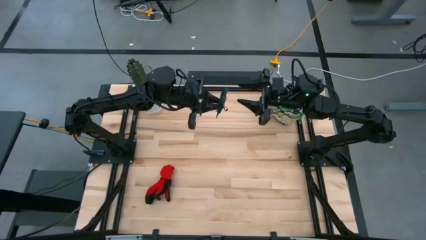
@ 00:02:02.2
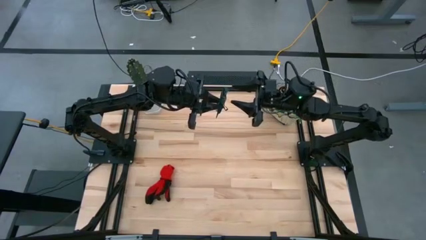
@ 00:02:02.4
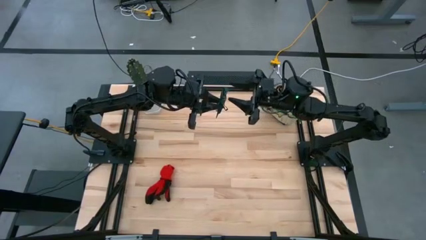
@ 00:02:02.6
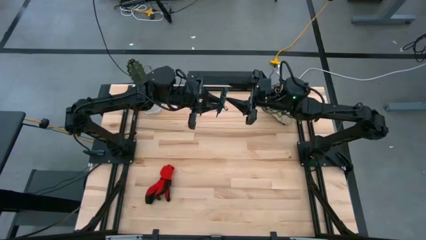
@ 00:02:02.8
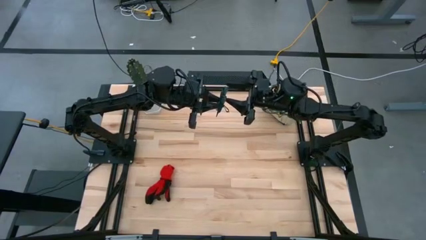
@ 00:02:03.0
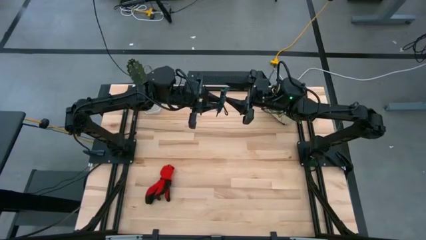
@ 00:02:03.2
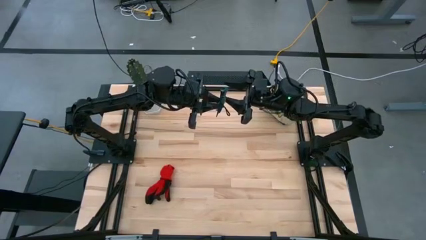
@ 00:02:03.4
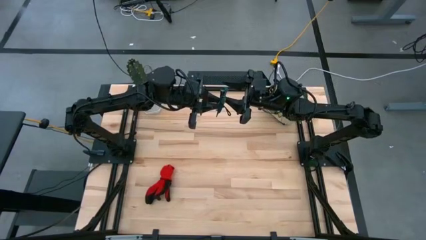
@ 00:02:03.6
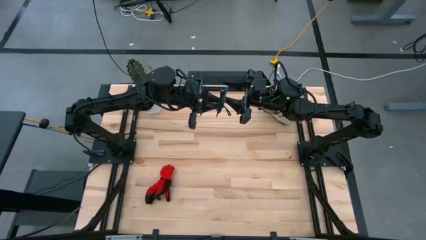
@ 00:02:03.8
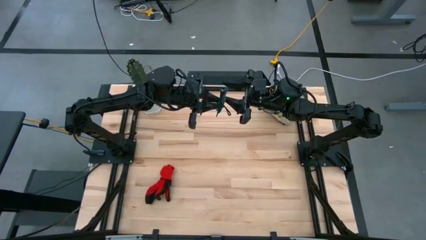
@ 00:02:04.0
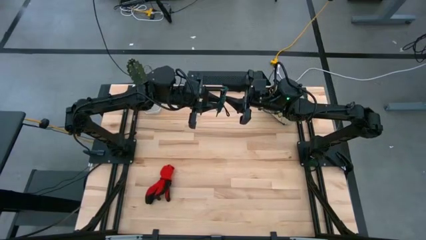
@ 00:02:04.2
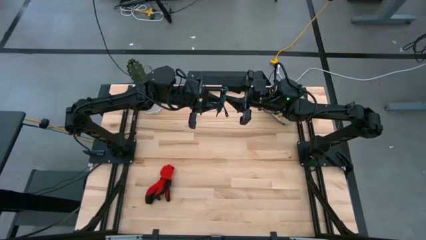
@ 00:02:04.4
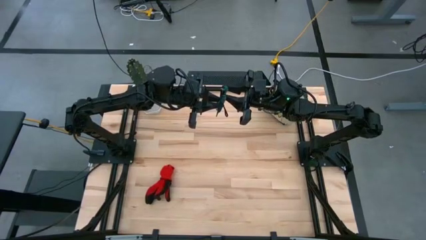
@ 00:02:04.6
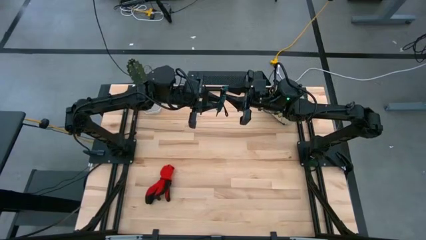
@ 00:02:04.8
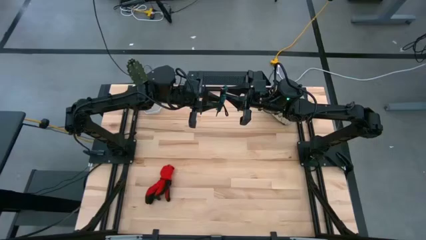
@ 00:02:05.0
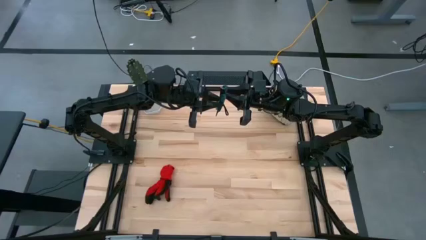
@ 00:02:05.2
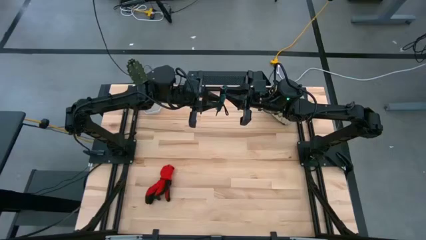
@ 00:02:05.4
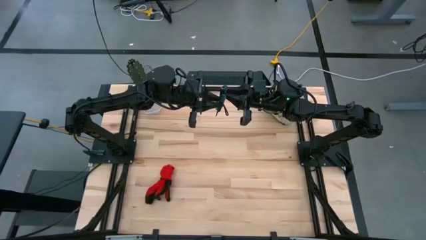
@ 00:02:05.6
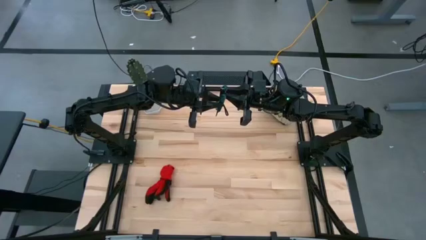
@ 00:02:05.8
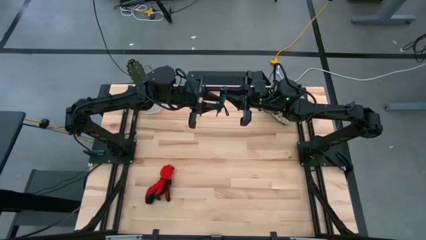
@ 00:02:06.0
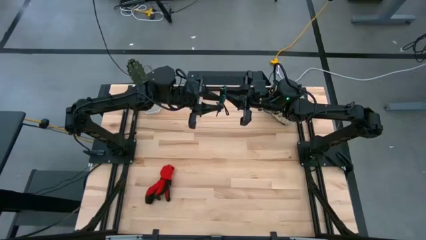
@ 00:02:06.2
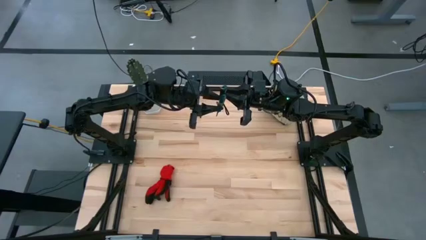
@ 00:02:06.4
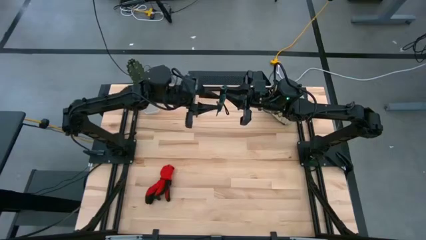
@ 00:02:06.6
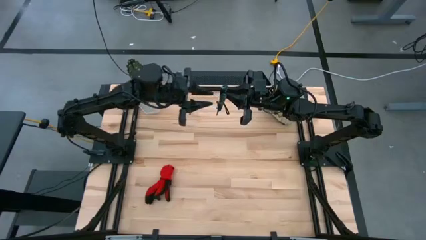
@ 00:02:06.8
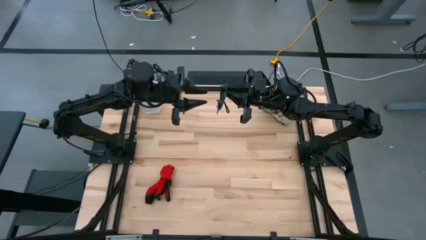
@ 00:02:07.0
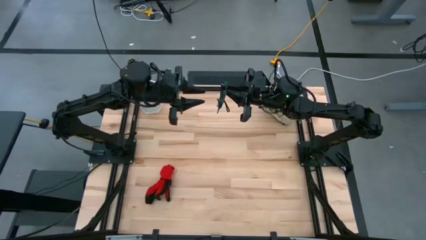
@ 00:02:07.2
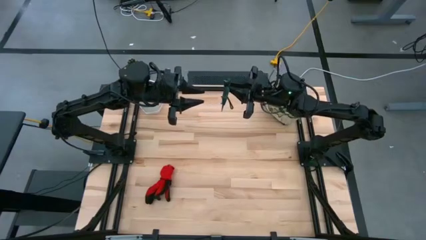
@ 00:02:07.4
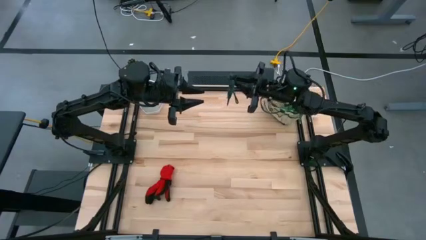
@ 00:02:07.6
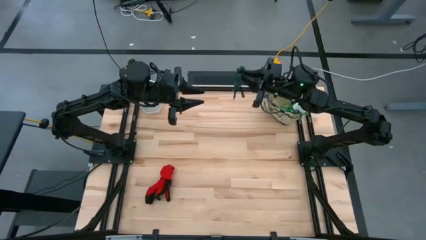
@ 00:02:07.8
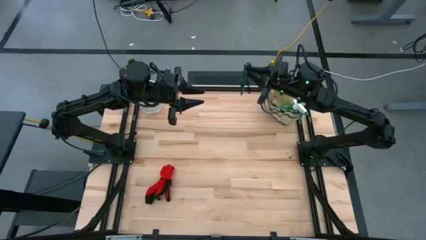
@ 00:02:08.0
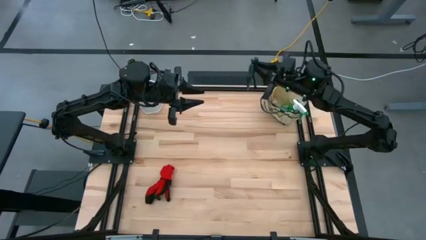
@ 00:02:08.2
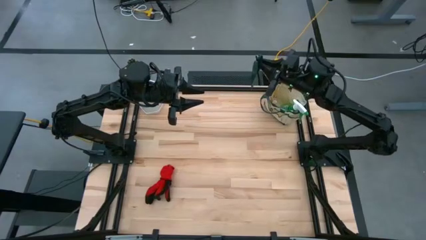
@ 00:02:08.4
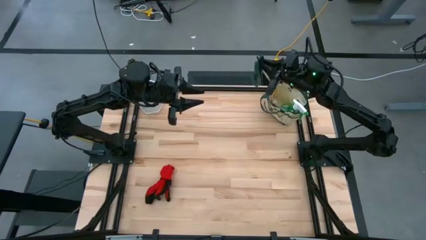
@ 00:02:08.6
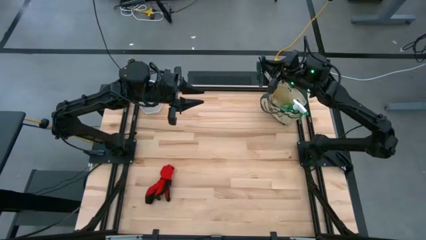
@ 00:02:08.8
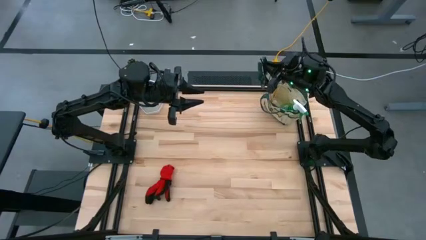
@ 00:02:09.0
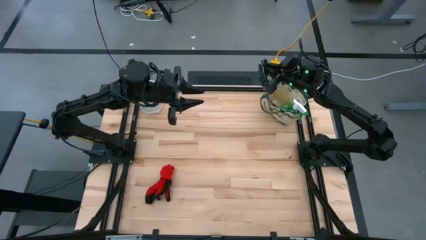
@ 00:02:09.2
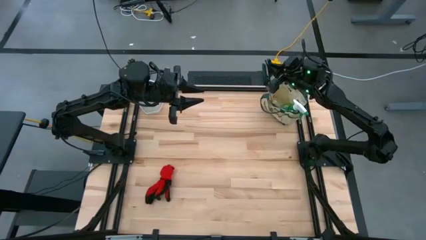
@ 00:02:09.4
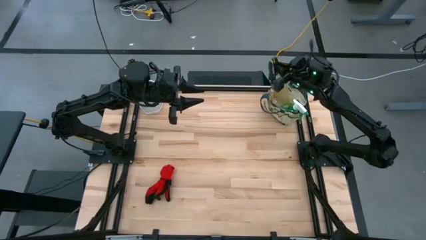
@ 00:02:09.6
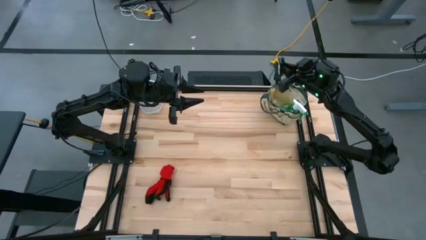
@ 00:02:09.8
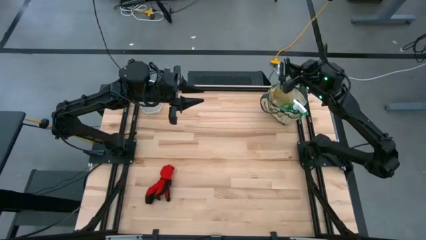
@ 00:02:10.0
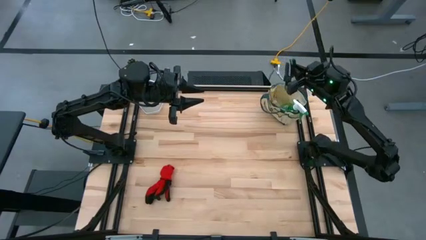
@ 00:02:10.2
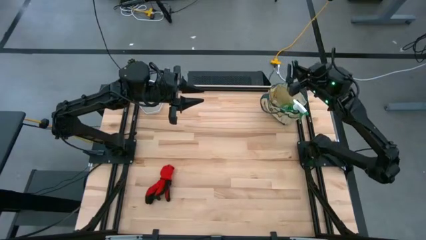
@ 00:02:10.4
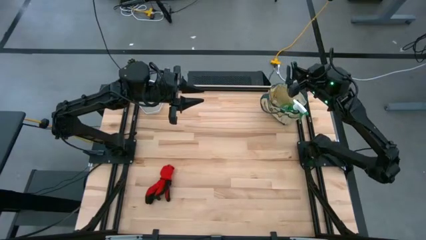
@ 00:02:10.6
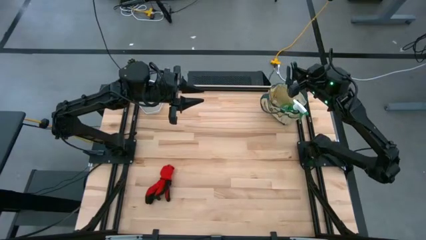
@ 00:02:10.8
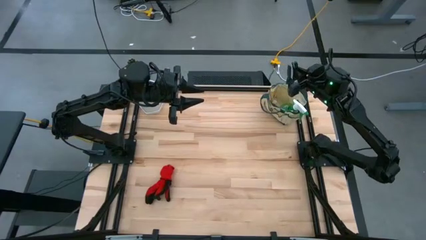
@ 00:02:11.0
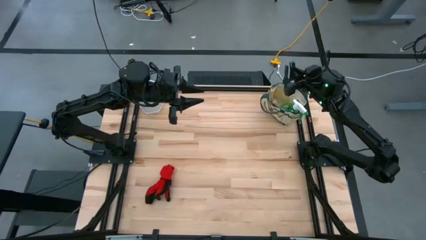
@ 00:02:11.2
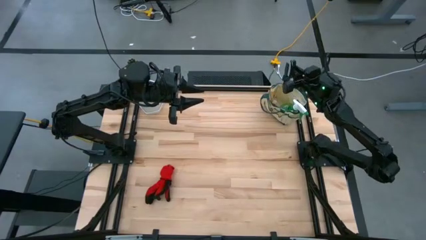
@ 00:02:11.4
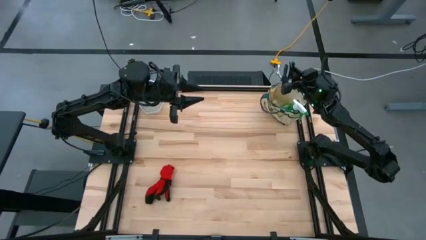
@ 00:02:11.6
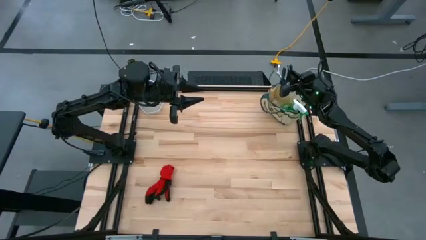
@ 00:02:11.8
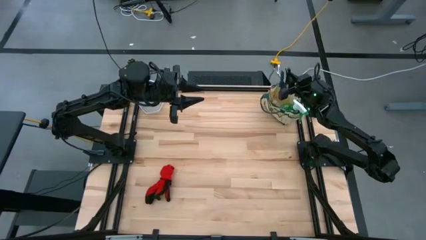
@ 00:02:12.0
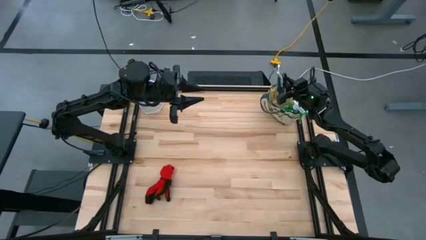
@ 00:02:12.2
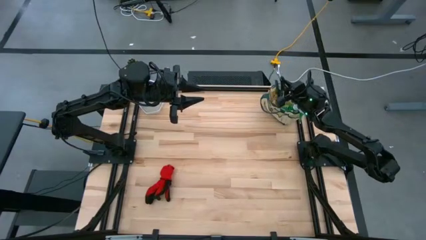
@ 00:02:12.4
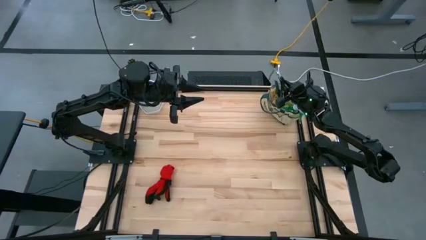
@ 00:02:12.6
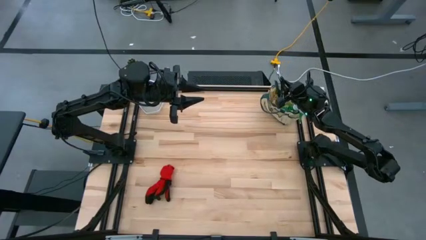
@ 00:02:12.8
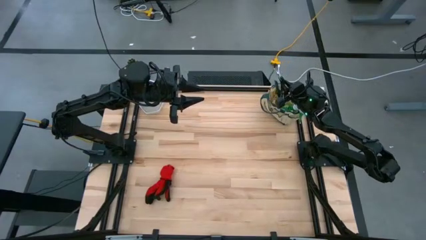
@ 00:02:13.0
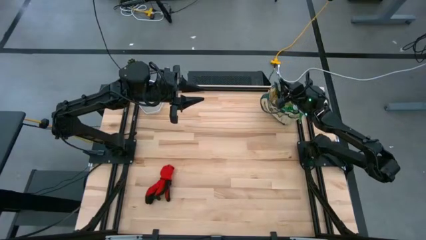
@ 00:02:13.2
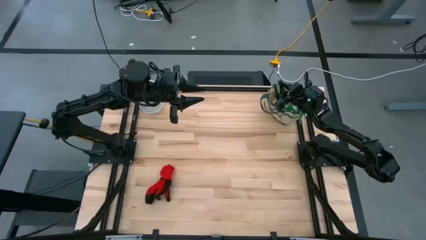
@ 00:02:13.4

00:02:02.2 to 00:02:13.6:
Task: Pick & Place Garden tools in Gardening bag
Put the green shear scissors into the white gardening bag

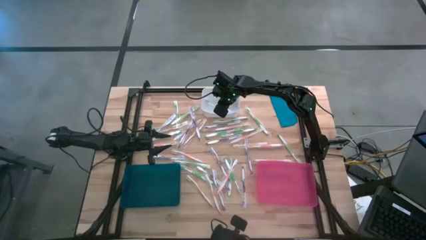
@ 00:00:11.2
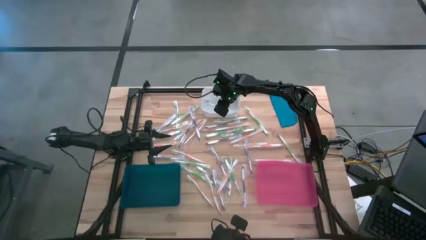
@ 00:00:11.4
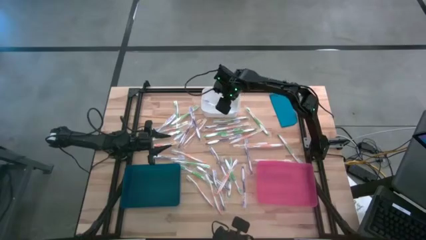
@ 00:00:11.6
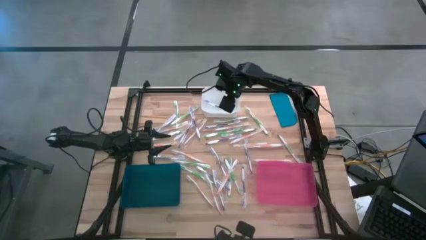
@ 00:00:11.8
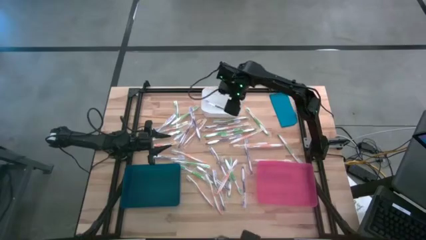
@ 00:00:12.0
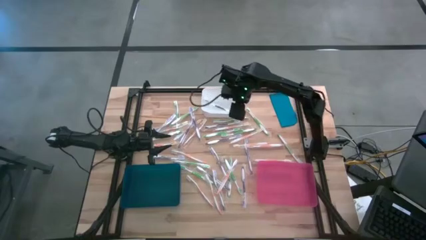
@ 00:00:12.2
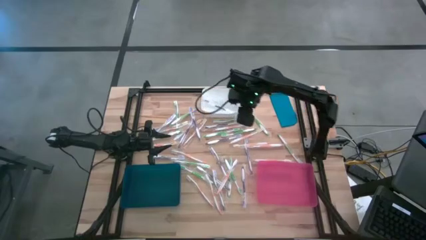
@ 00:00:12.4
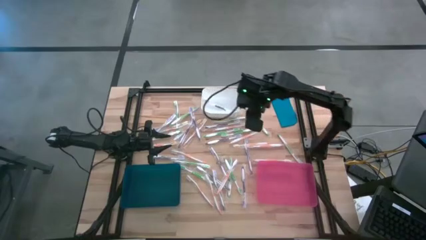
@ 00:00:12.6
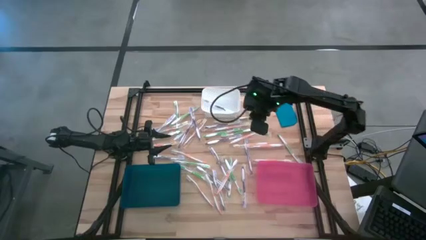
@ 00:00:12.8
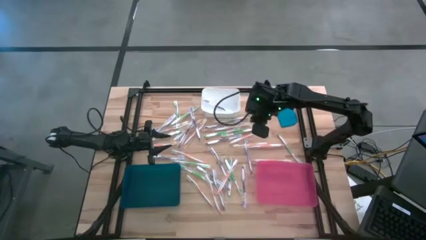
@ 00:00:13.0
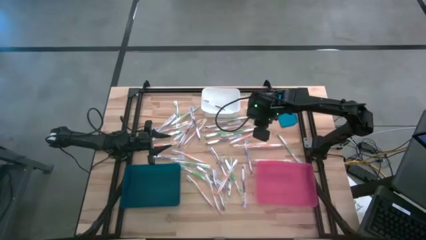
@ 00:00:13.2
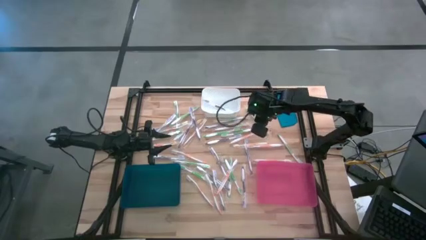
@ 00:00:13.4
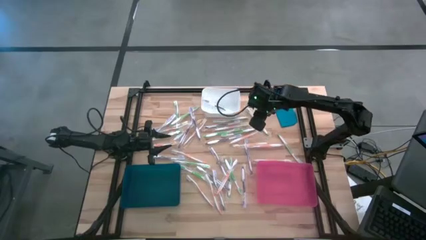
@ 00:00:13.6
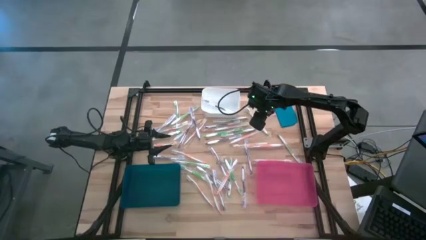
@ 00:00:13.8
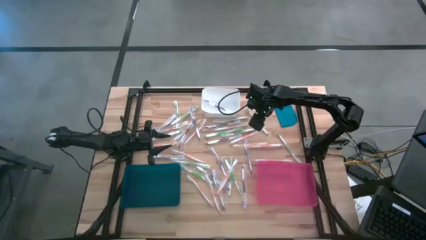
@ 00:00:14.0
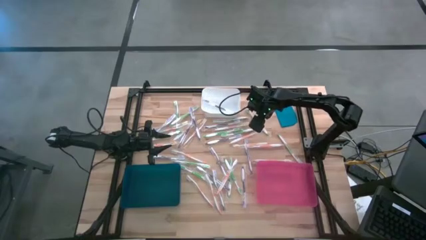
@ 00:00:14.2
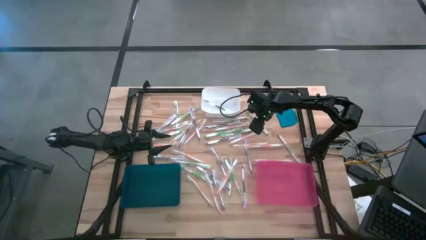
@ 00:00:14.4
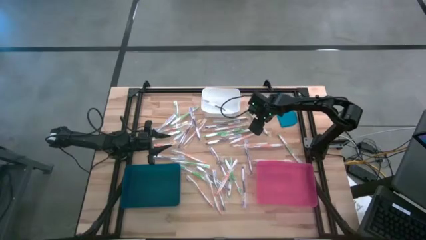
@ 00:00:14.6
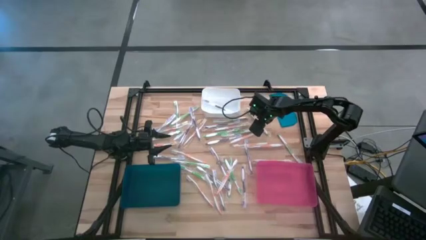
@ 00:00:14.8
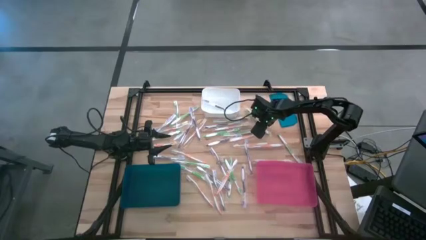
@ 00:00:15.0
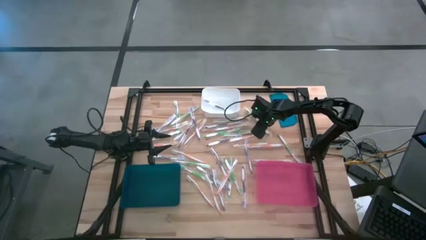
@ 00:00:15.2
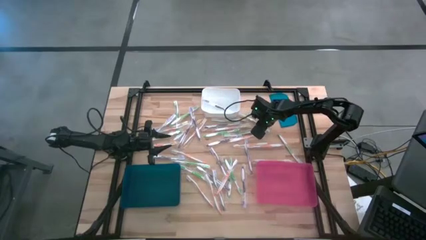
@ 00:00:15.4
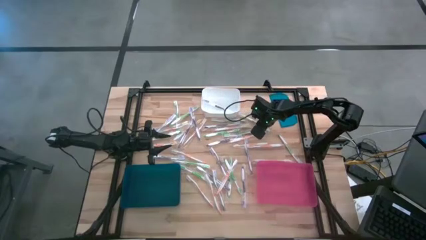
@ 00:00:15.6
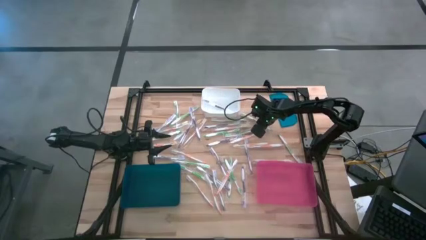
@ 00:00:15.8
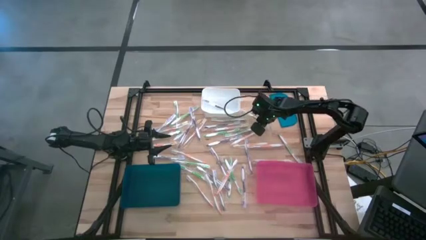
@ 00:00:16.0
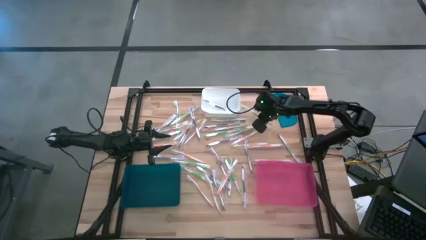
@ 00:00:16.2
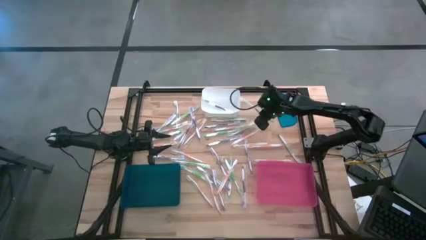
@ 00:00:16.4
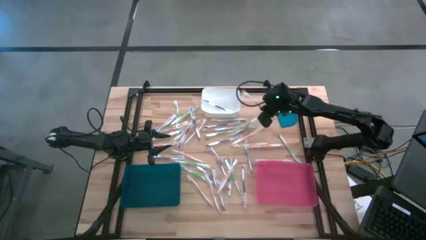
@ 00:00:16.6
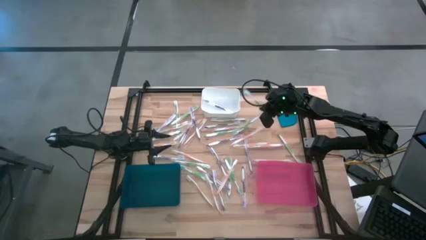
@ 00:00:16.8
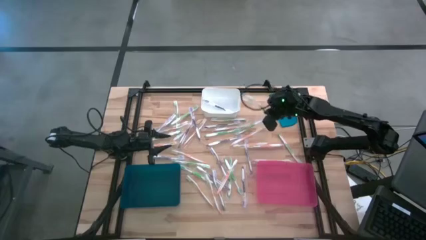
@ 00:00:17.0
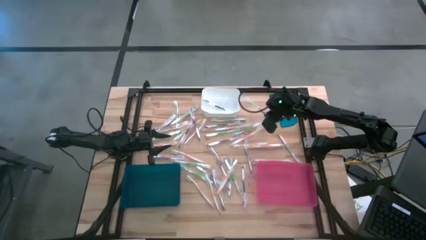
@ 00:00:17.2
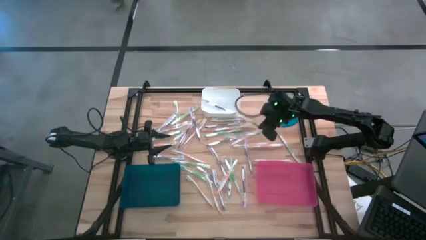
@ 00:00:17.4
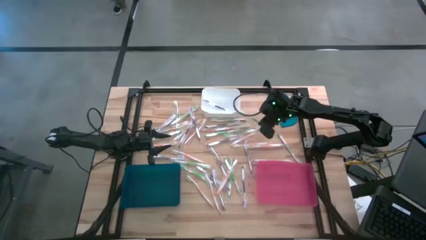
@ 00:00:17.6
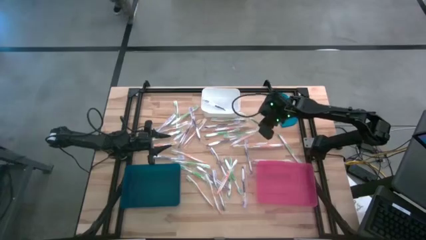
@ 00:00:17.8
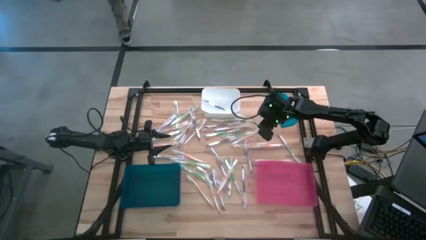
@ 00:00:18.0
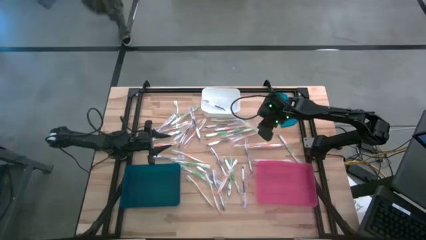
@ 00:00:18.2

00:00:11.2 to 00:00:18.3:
Task: Pick & Place Toothbrushes
Put the green toothbrush into the pink bin
